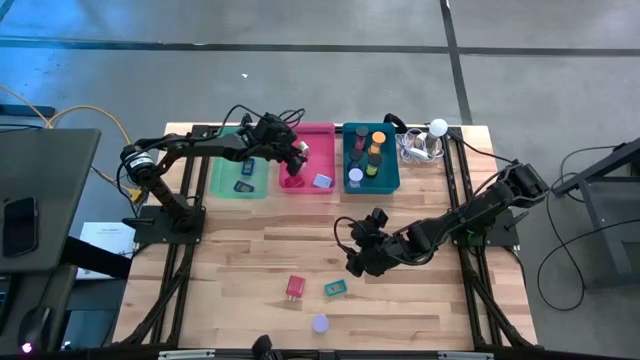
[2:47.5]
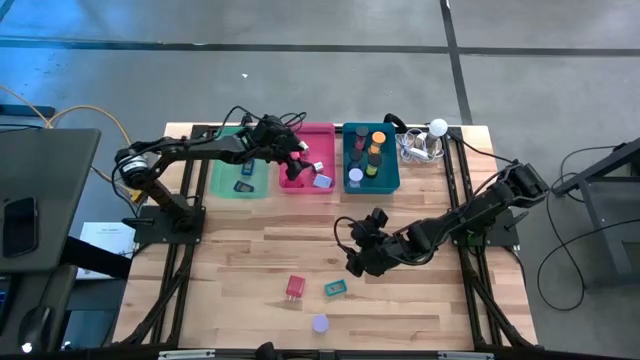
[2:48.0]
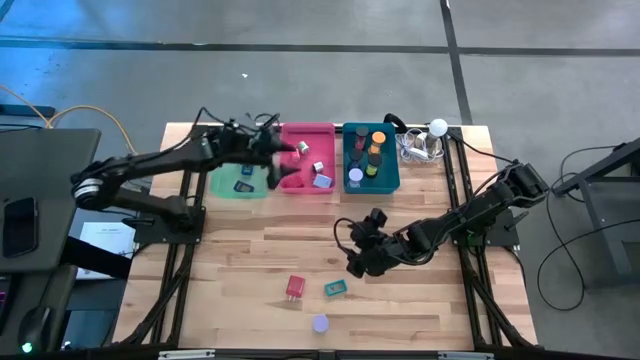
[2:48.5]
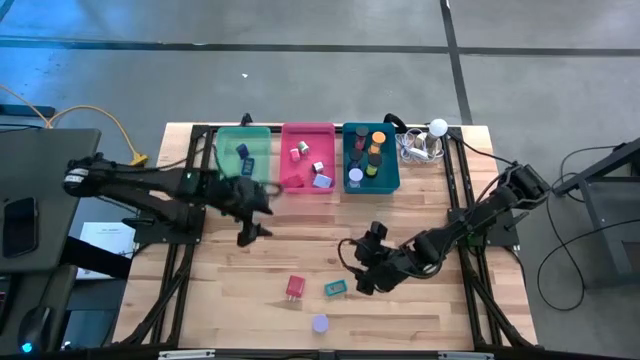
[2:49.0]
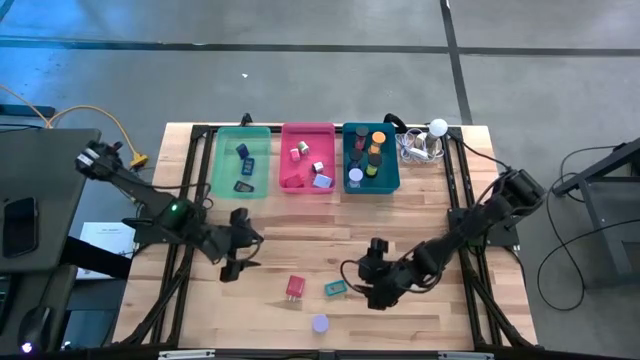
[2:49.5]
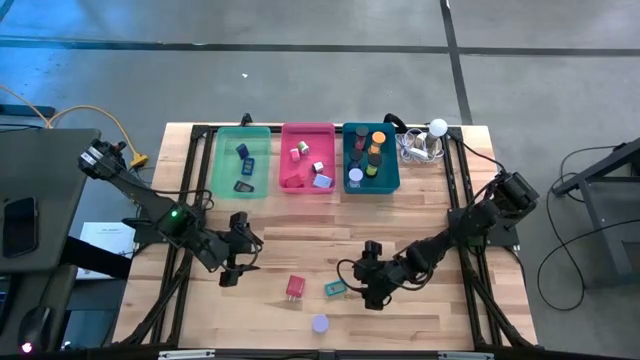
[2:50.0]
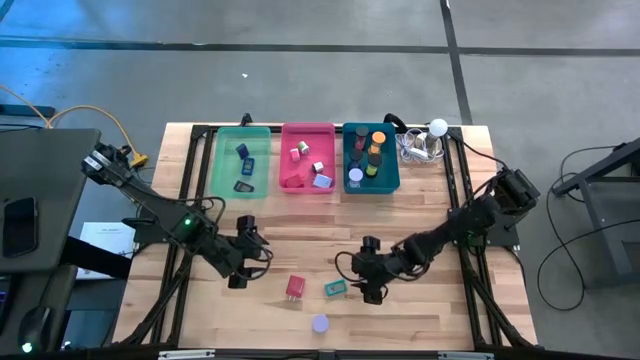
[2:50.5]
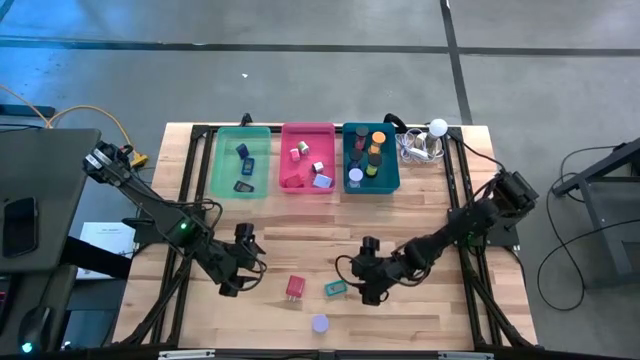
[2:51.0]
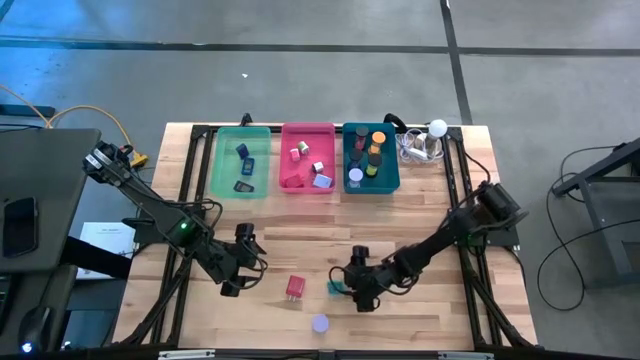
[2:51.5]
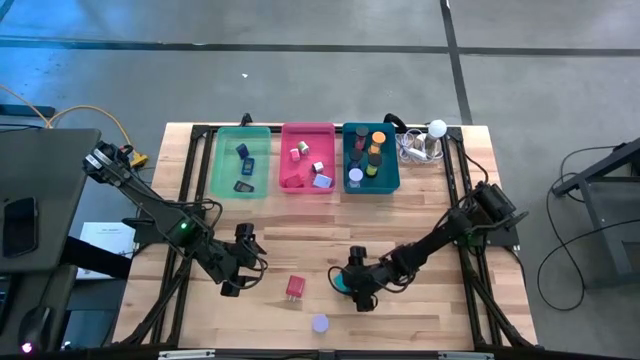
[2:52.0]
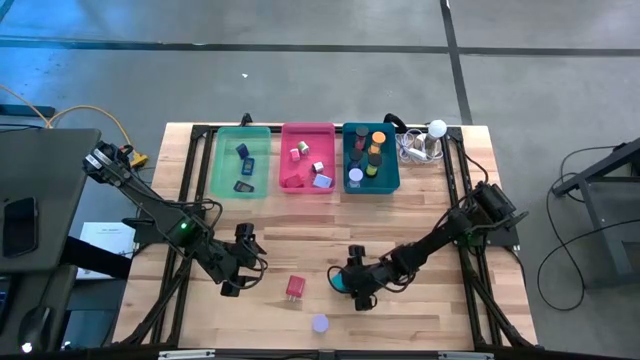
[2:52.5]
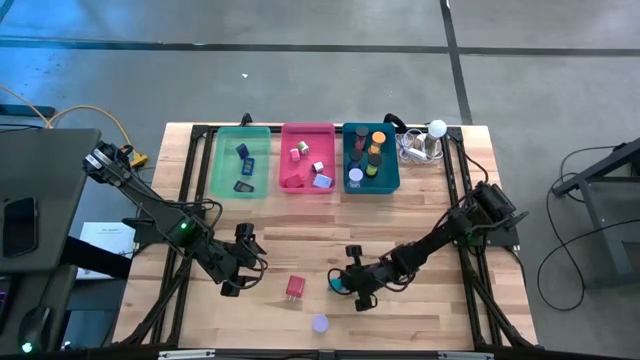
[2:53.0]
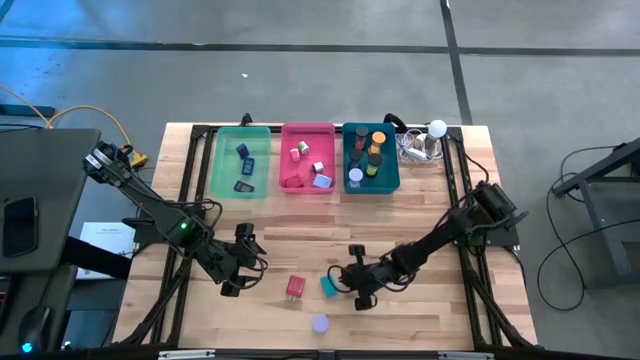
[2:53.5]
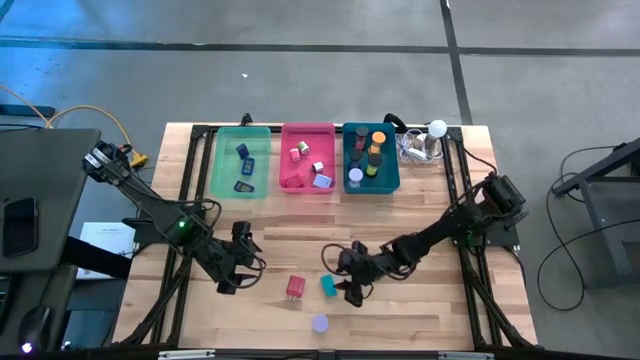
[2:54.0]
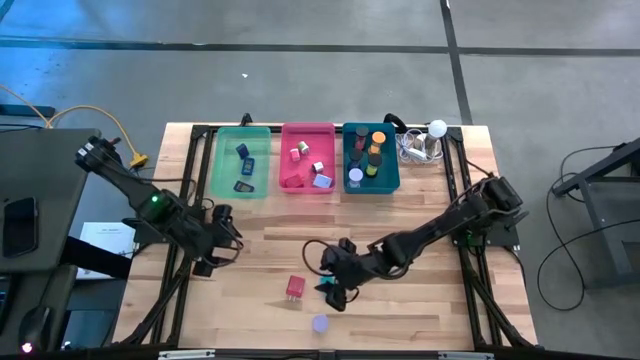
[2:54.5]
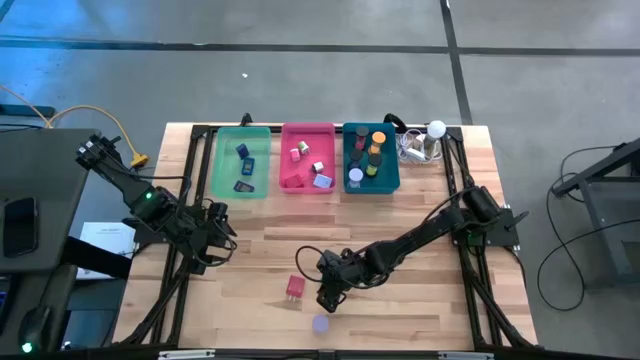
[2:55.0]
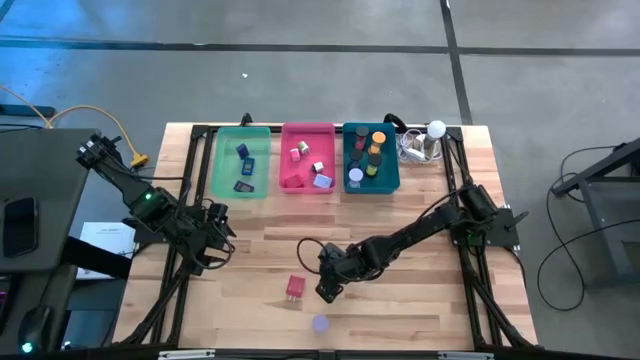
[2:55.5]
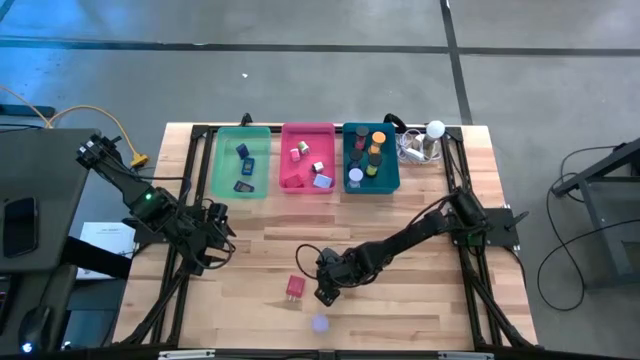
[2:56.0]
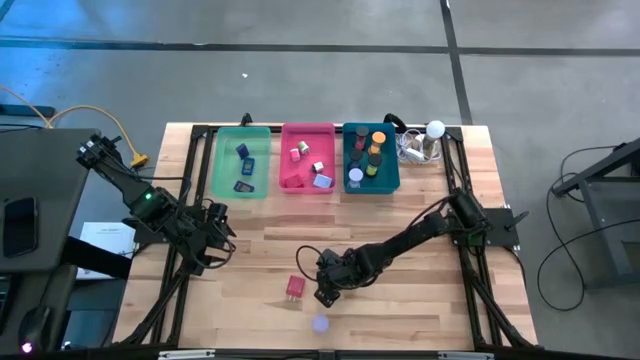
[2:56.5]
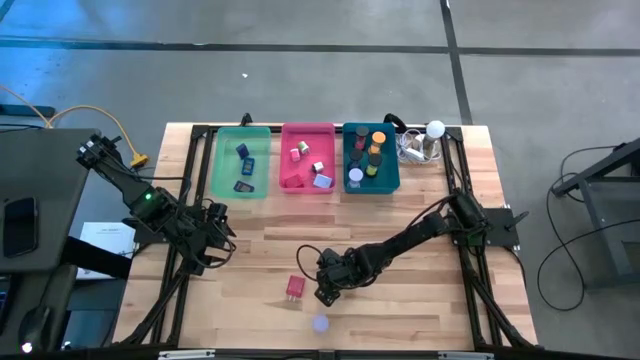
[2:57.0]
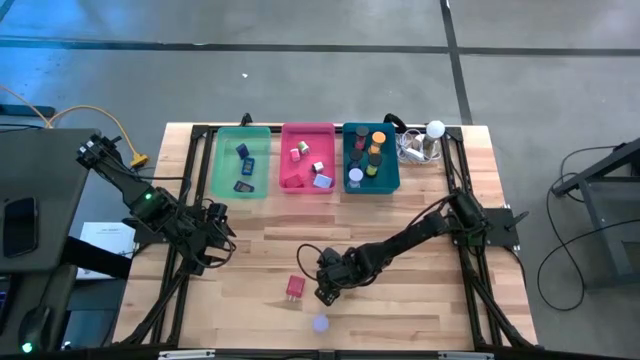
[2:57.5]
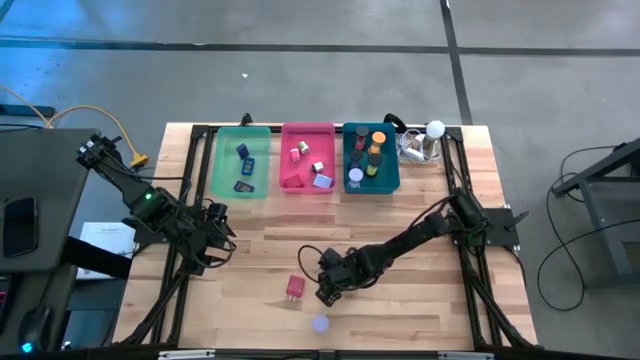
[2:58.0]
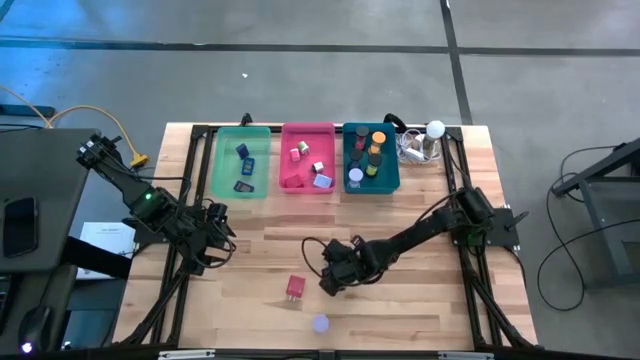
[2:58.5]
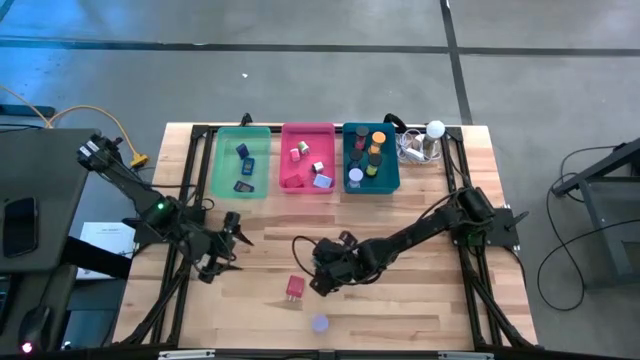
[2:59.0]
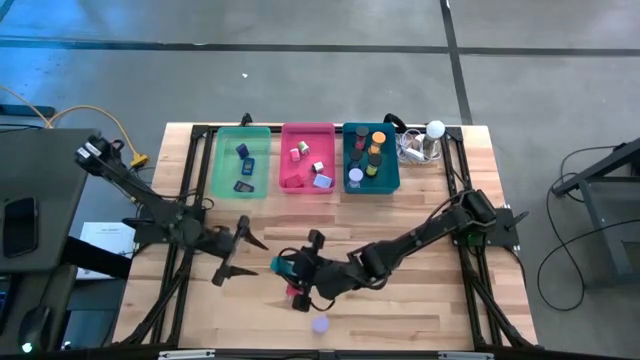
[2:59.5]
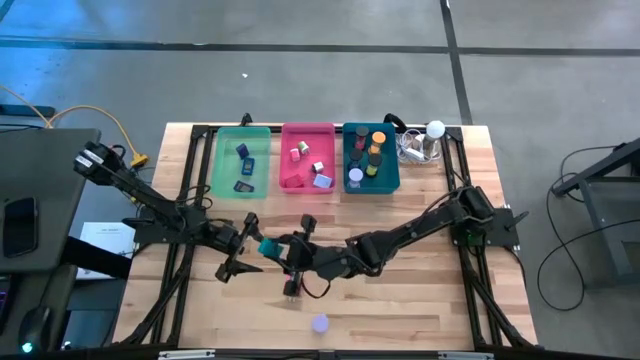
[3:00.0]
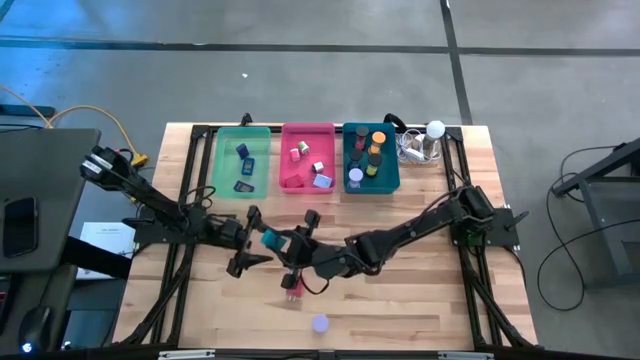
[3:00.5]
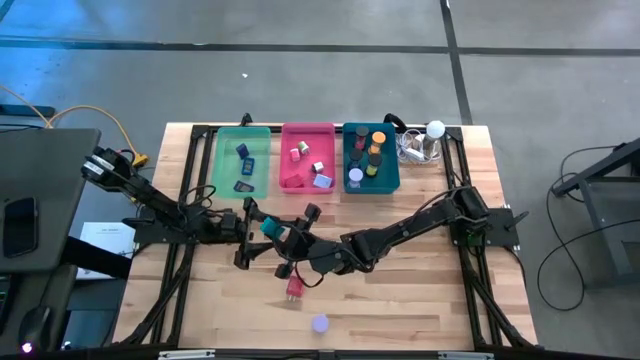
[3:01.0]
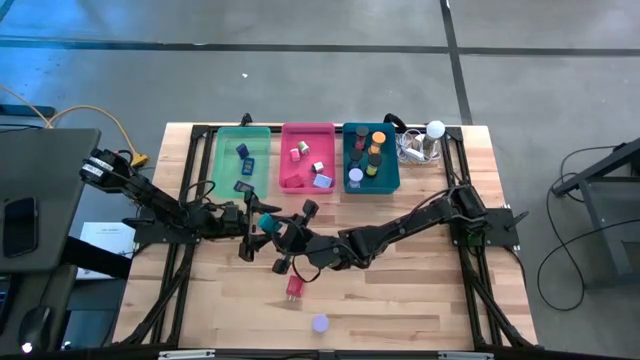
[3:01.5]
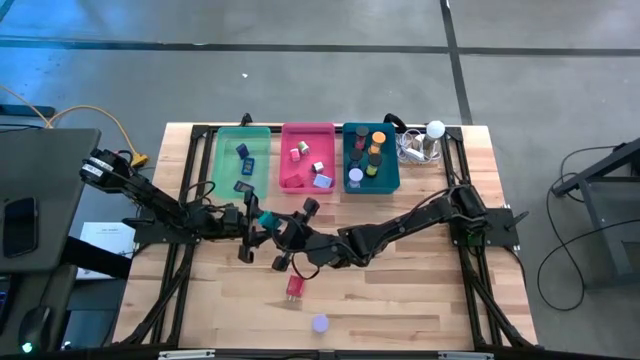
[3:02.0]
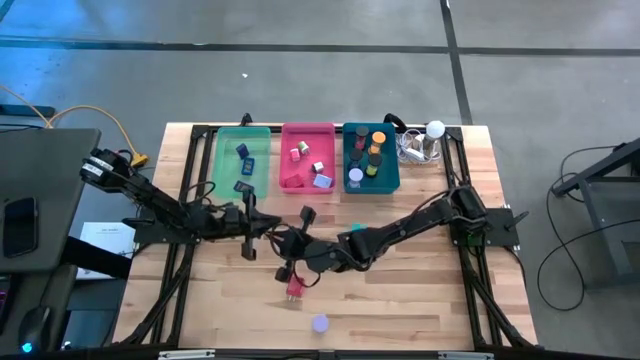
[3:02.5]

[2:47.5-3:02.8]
Task: Pick & Place Office items
Put the blue digital timer into the green bin

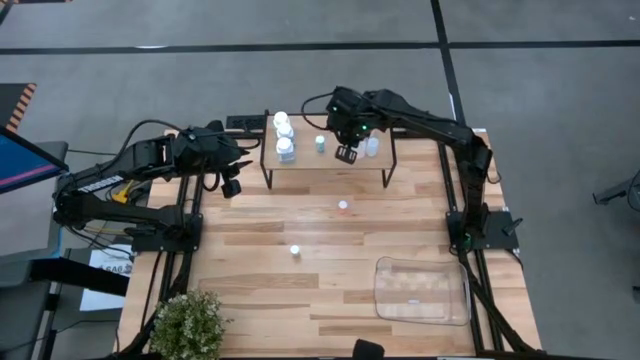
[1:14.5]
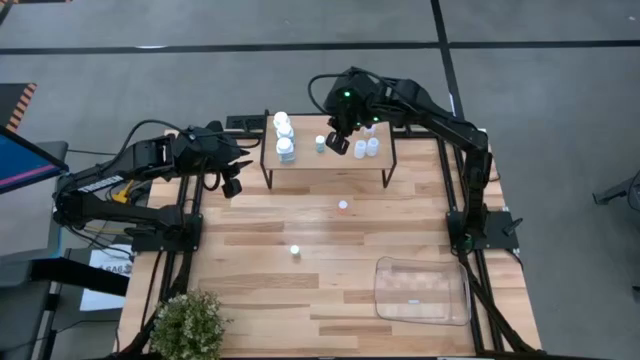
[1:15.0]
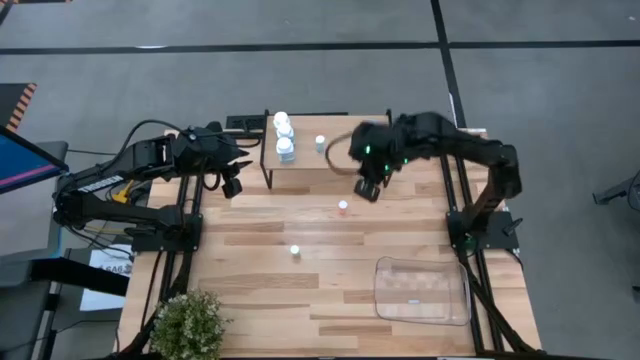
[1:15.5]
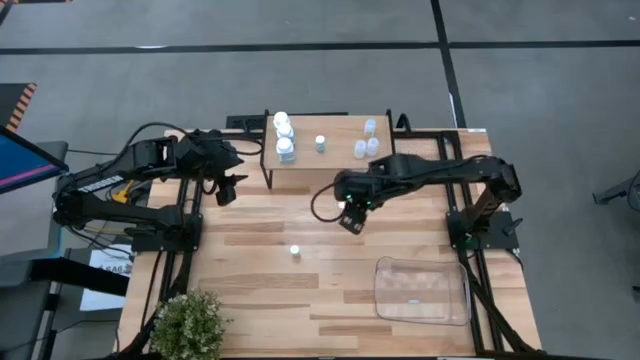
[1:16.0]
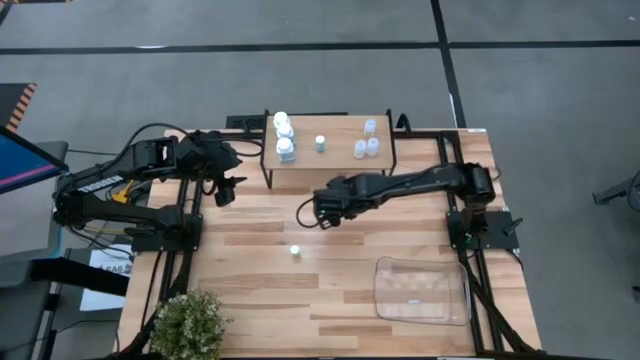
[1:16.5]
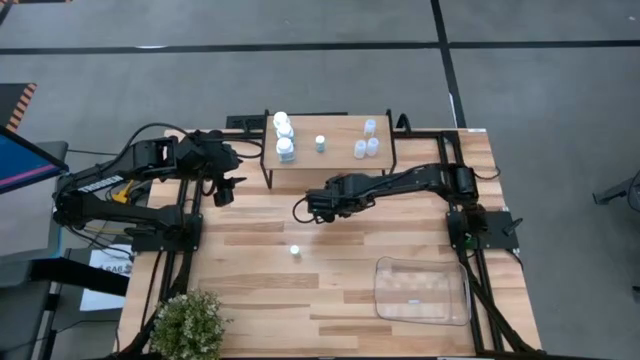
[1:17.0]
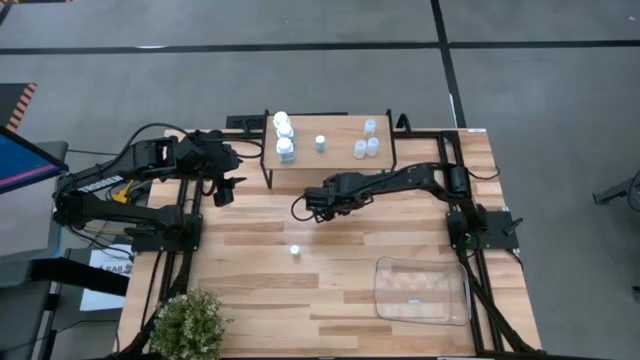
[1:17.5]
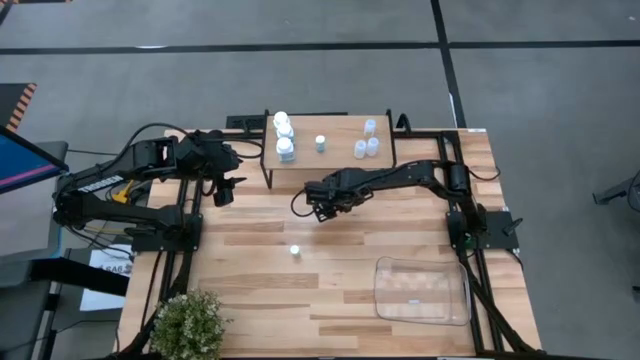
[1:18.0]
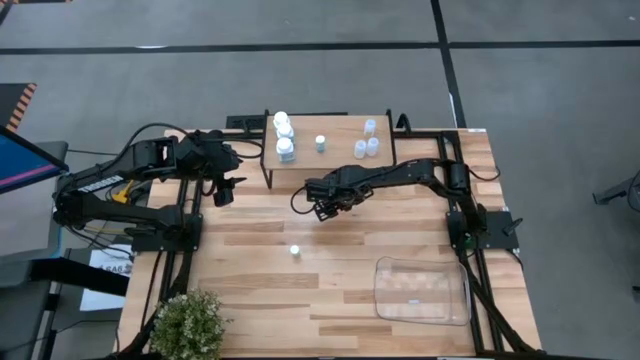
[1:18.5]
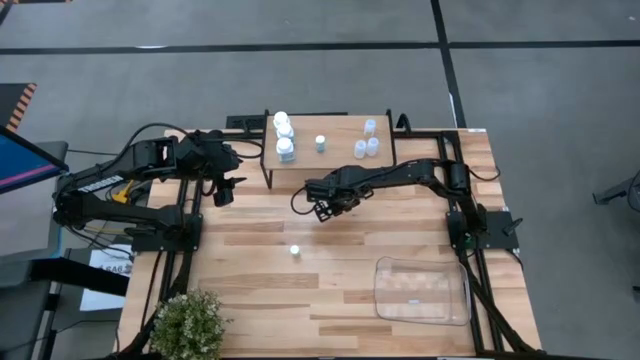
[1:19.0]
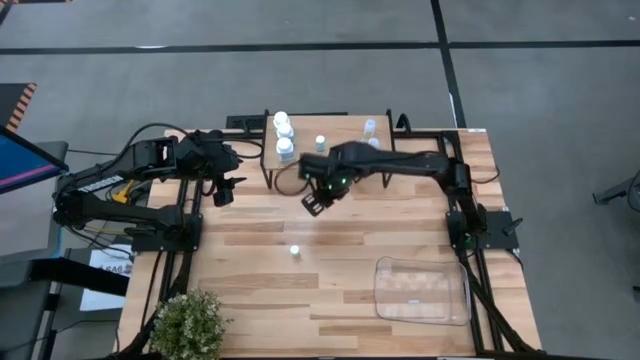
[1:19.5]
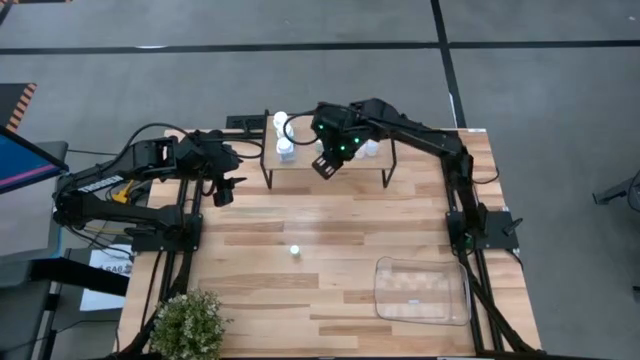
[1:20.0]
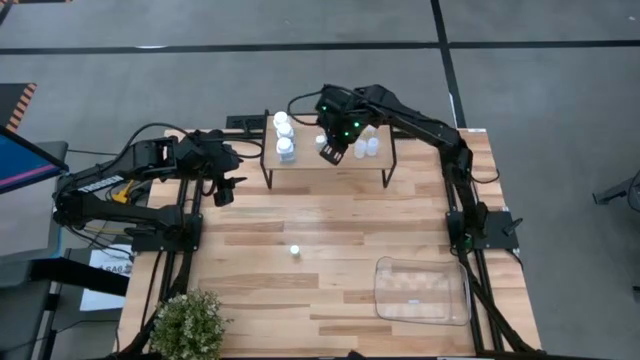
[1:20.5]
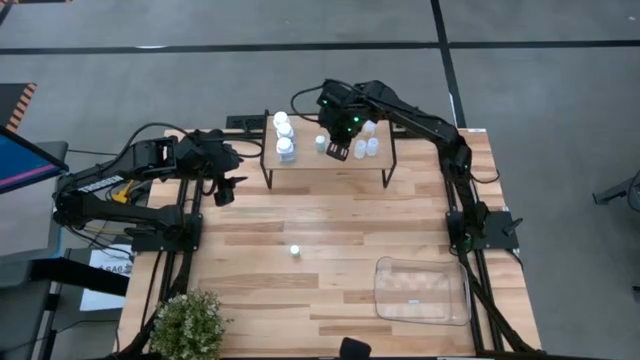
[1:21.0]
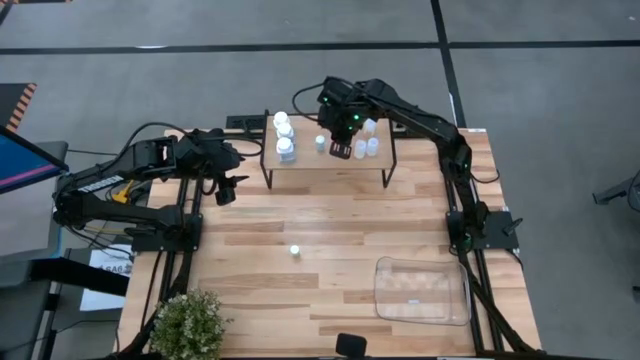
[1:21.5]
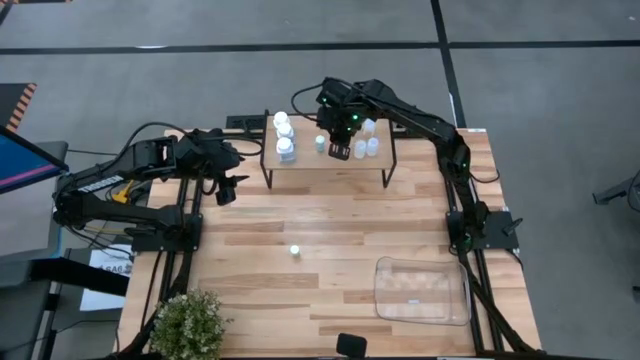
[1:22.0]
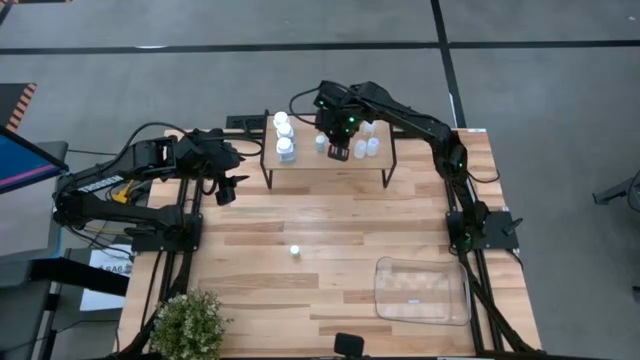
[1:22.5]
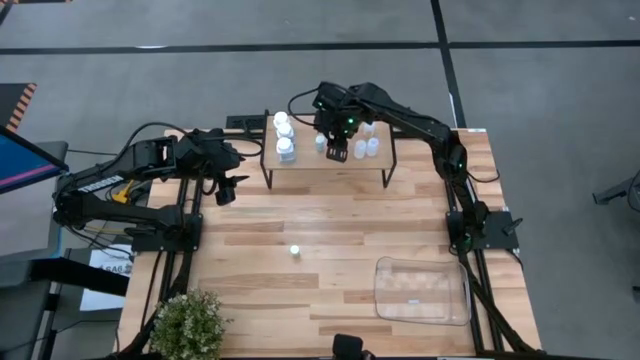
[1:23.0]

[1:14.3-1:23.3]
Task: Pick and place medicine bottles onto shelf by color
Put the red pill bottle on the shelf
